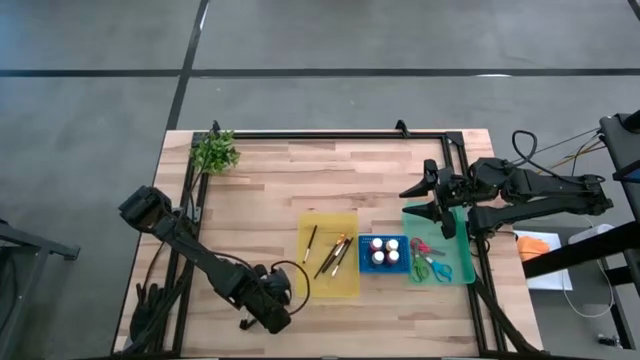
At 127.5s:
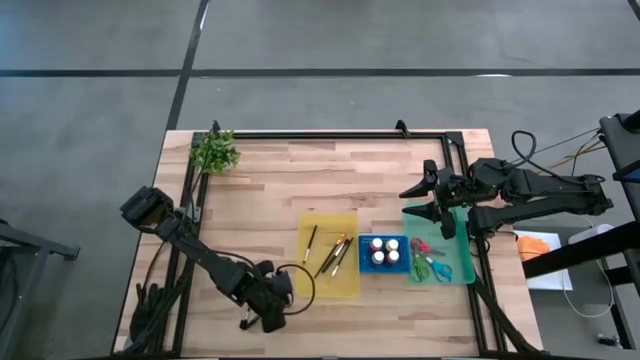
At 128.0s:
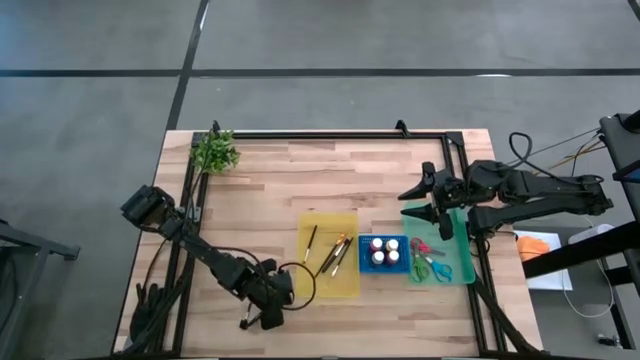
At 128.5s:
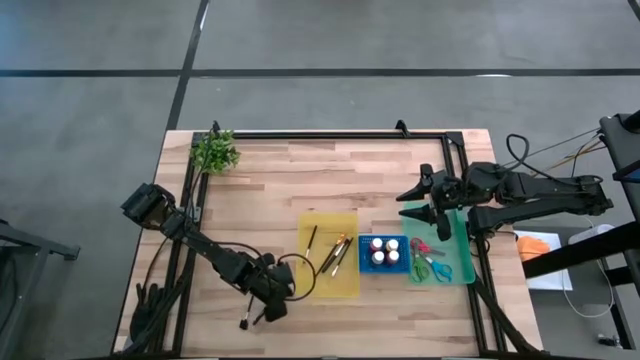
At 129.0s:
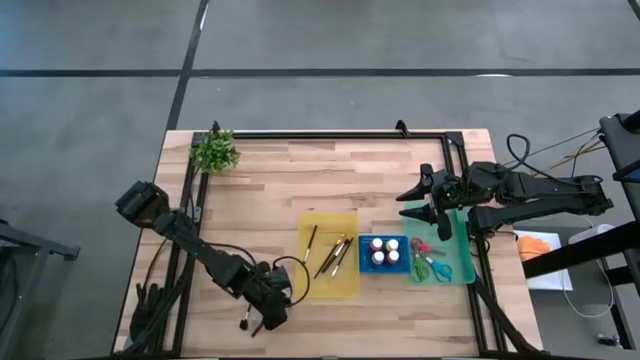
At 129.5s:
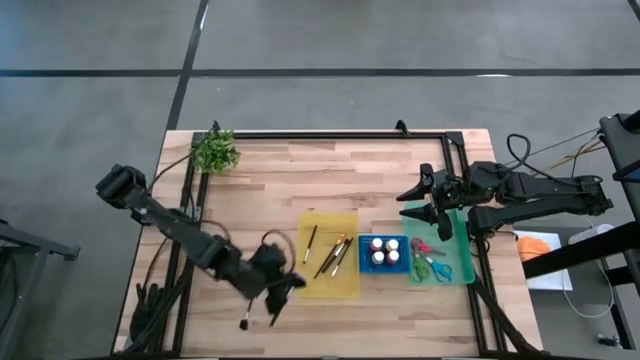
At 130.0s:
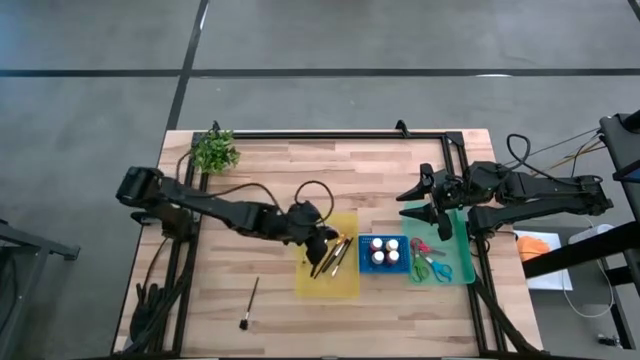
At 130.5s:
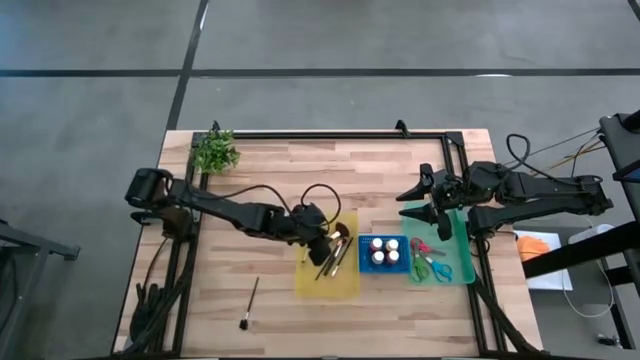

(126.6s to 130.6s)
Task: Pick & Place Paint Supplies
Put the silver and black highlighter brush into the yellow bin

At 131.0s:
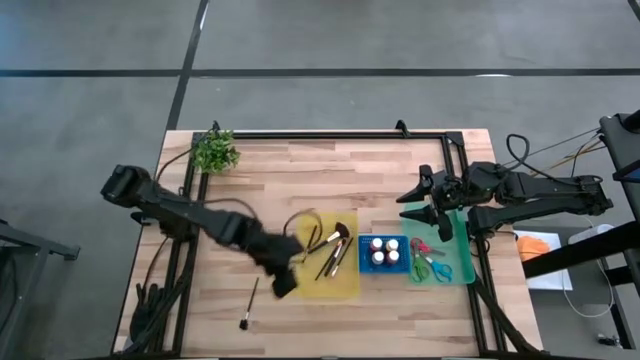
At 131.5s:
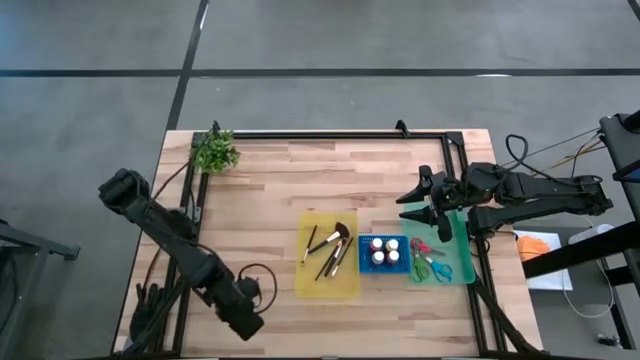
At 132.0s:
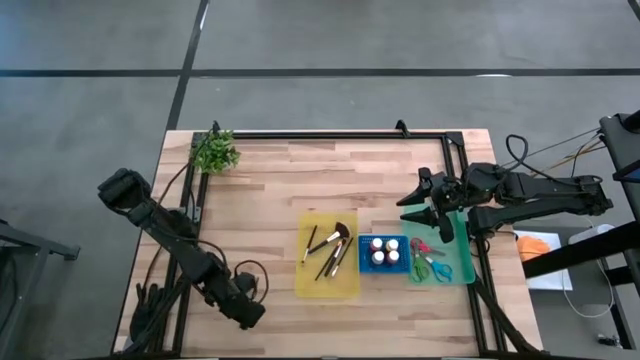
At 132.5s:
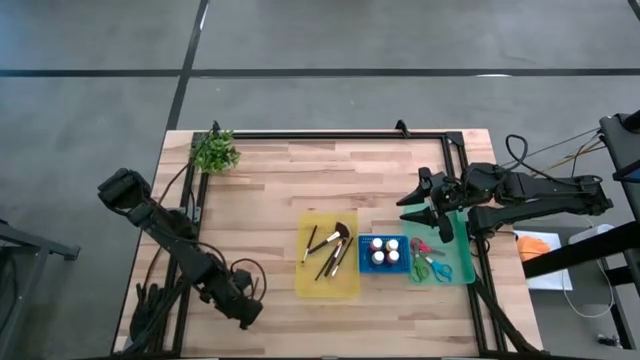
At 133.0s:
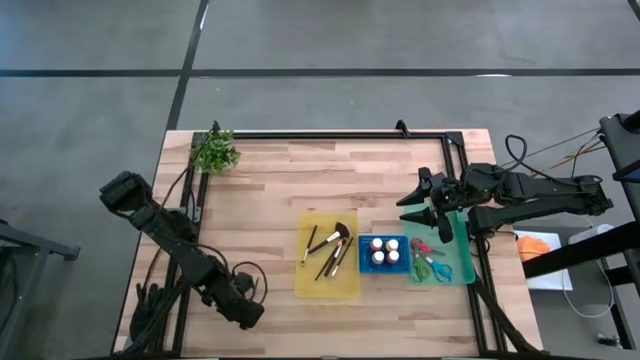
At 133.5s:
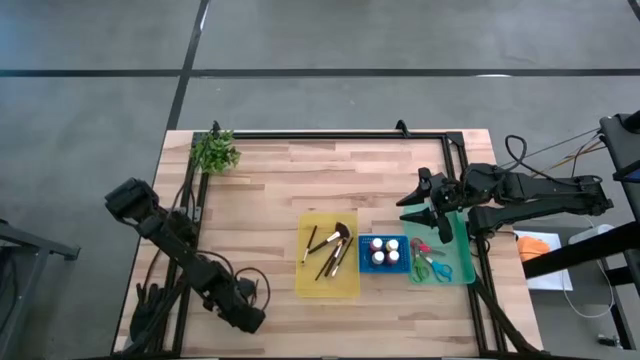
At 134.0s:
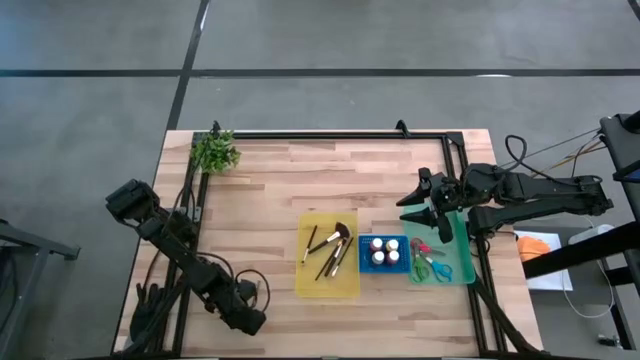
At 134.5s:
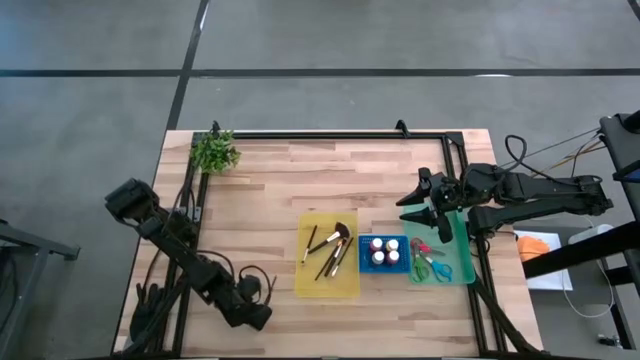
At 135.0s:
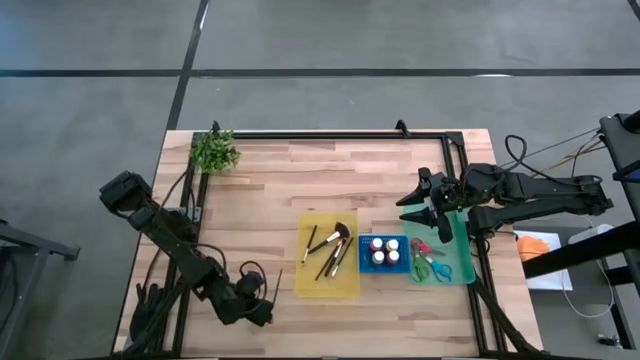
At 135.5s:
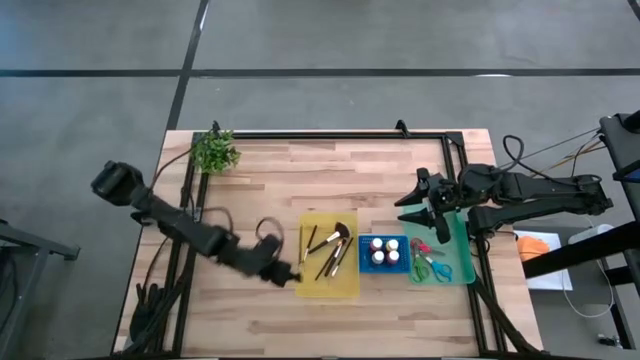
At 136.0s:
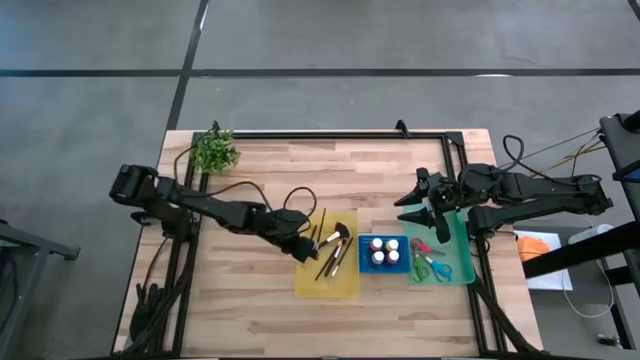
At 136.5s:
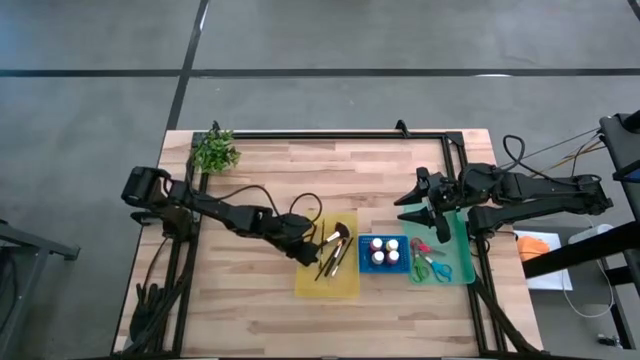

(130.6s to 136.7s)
Put the silver and black eye groomer brush into the yellow bin

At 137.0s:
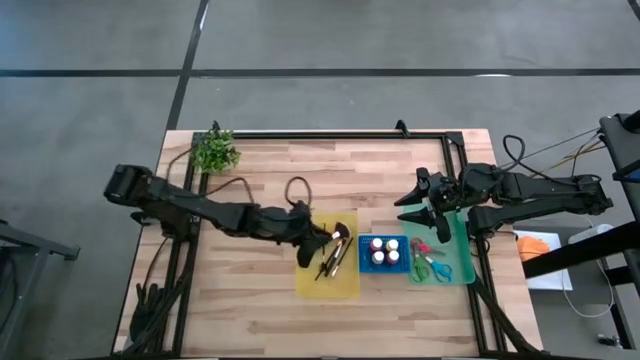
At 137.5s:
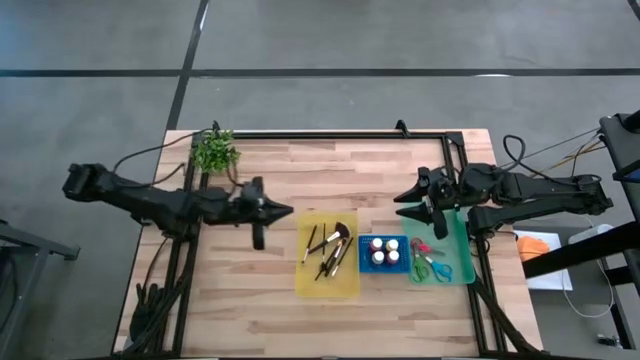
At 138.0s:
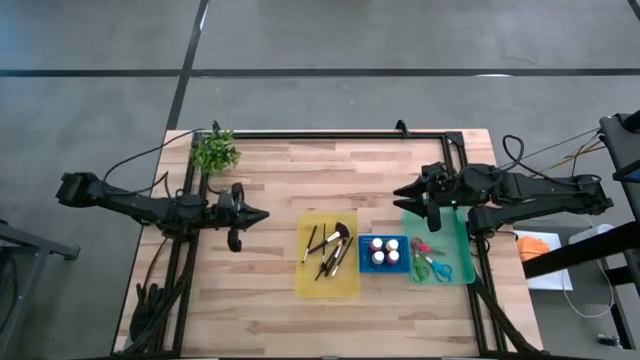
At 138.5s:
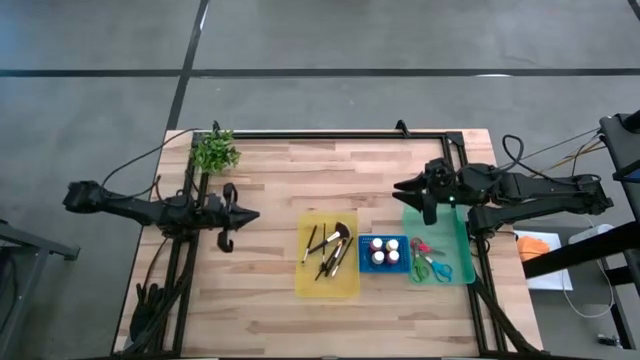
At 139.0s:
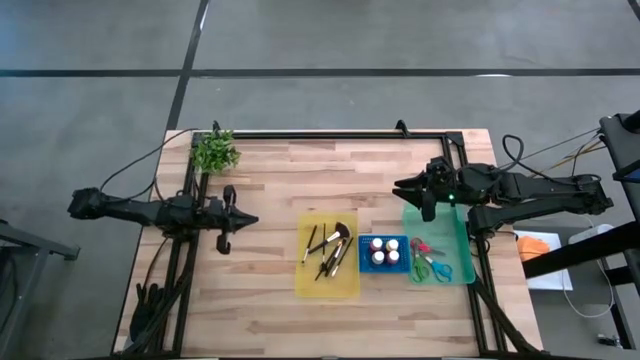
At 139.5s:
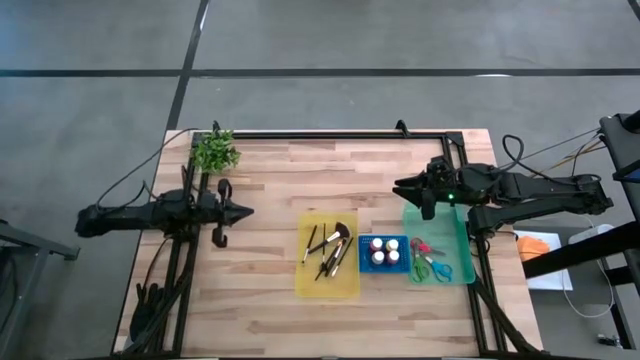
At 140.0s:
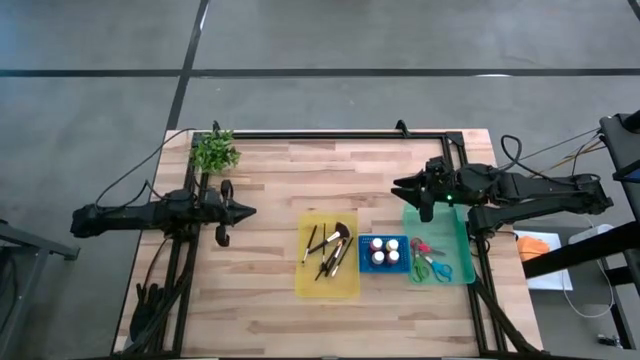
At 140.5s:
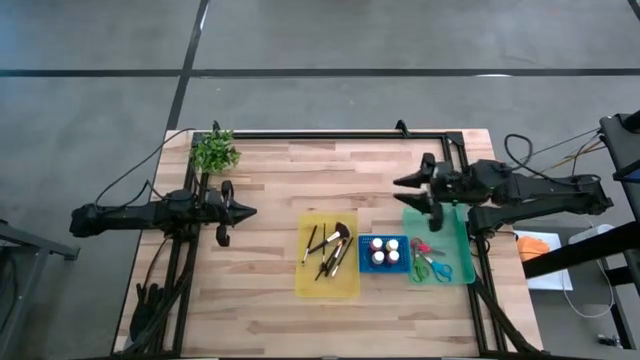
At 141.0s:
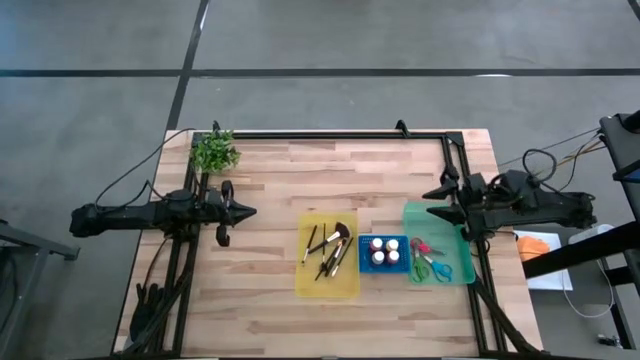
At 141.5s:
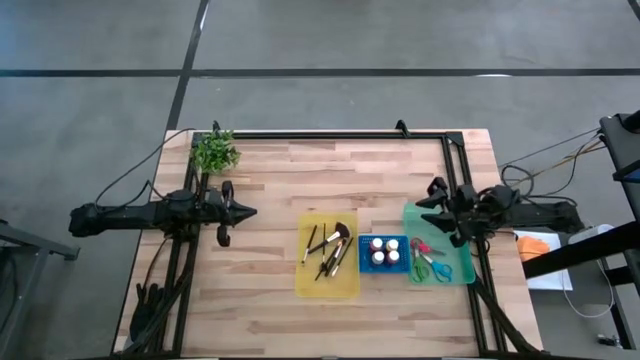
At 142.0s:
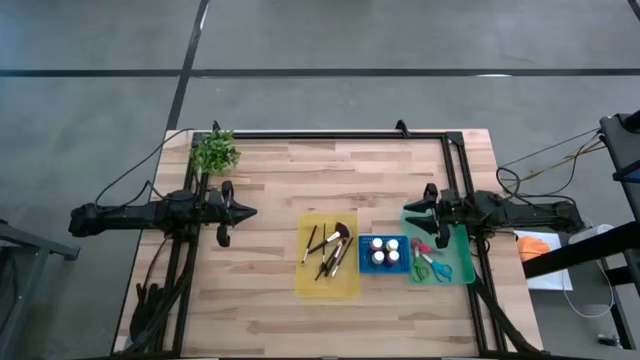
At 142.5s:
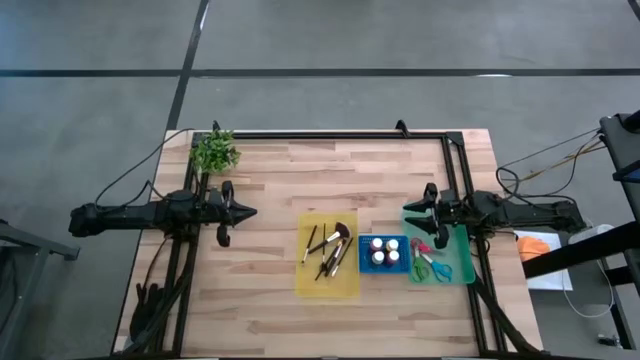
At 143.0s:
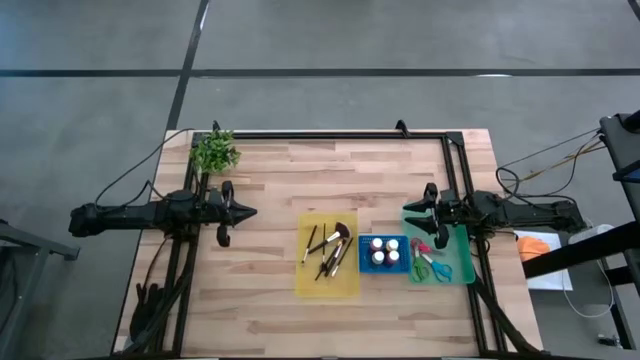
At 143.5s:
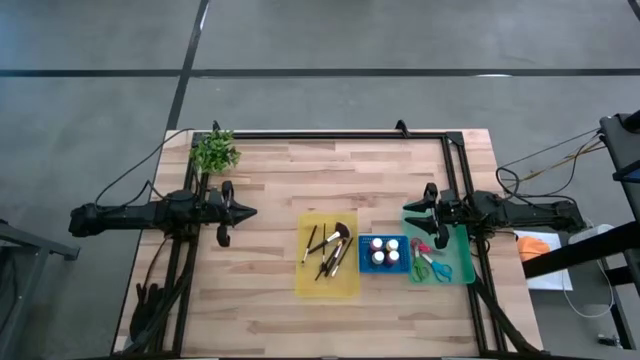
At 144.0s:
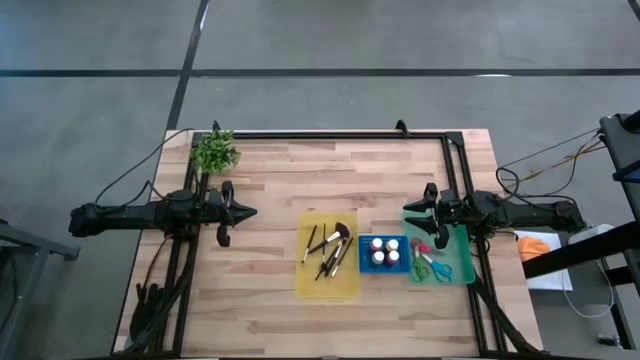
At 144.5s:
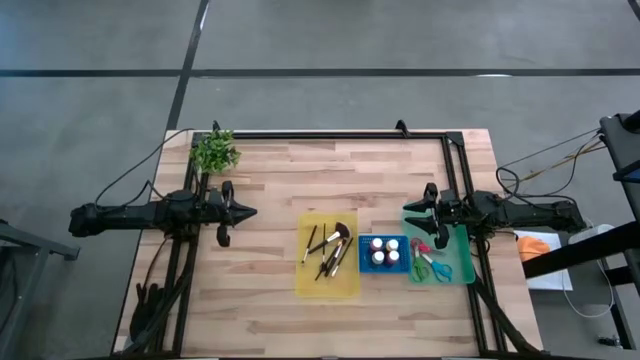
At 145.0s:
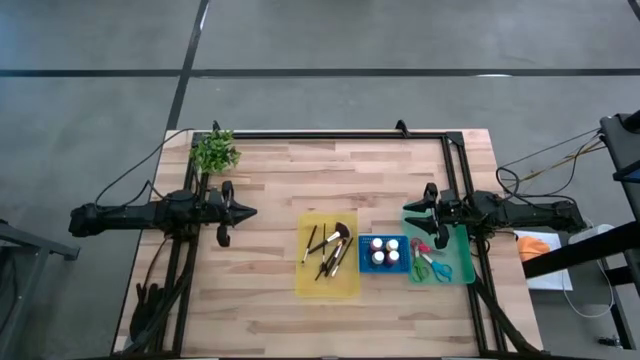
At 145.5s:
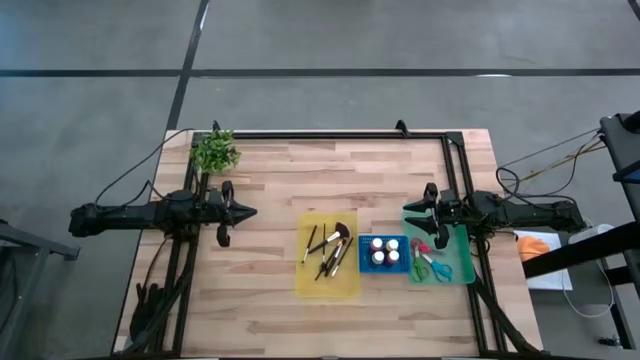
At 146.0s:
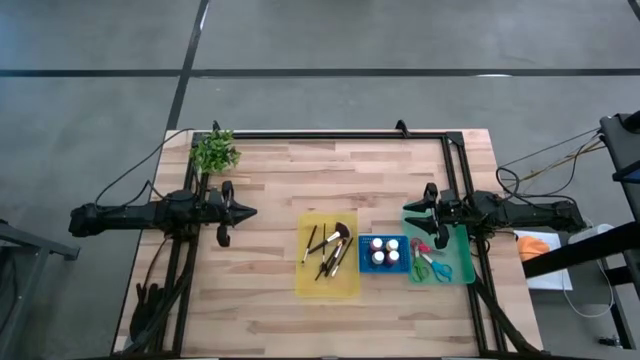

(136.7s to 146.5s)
Return to Home Position
